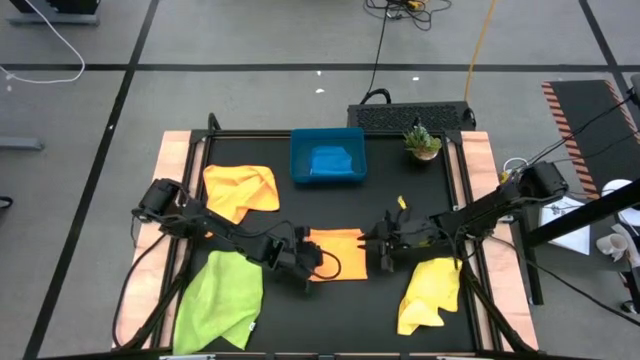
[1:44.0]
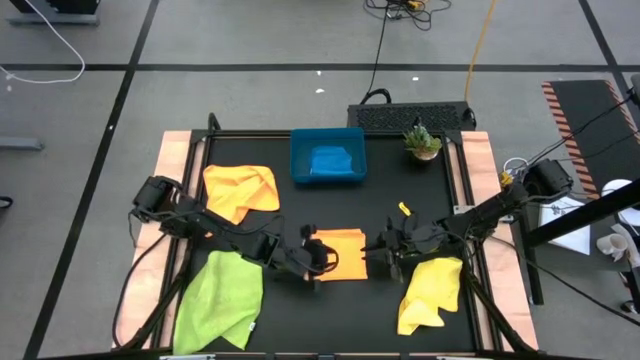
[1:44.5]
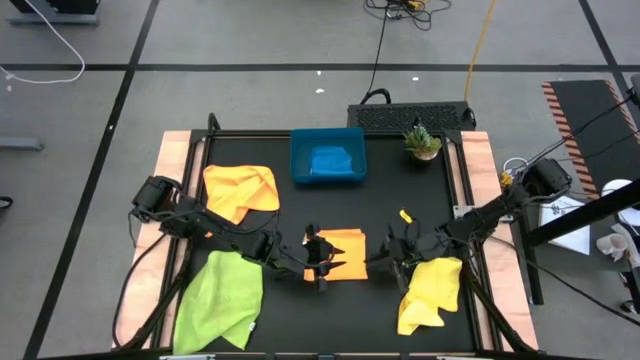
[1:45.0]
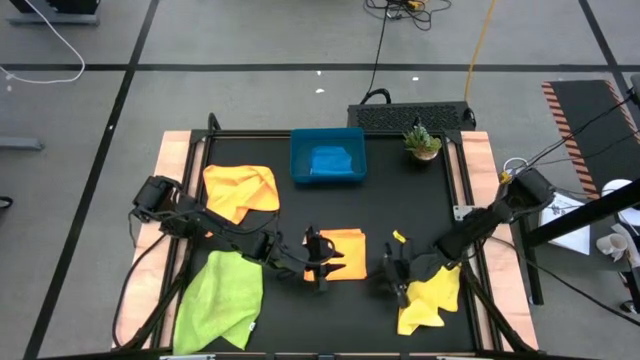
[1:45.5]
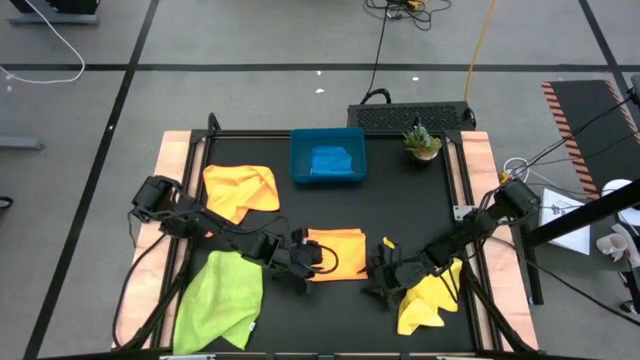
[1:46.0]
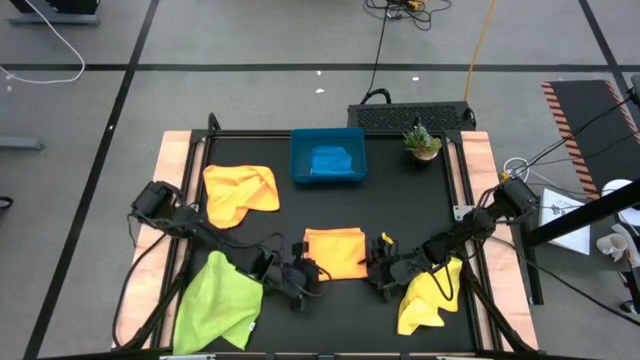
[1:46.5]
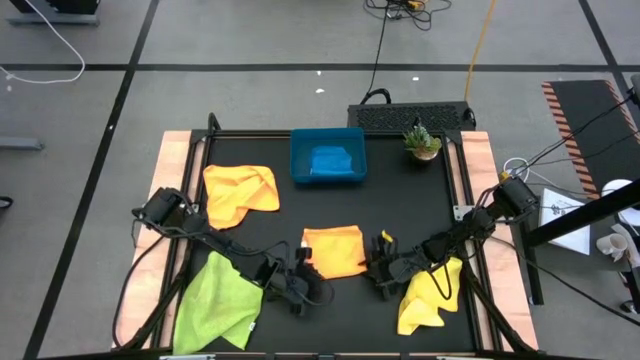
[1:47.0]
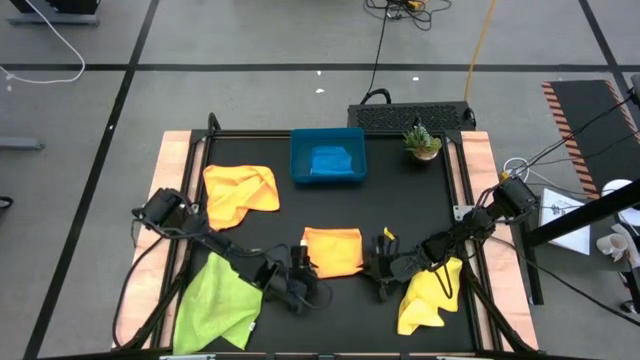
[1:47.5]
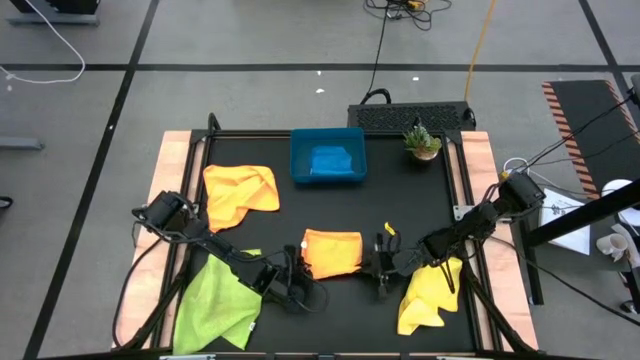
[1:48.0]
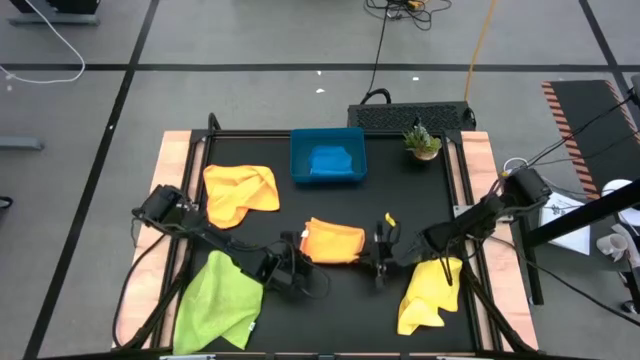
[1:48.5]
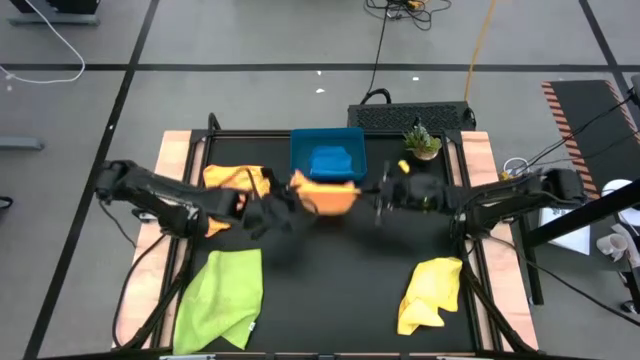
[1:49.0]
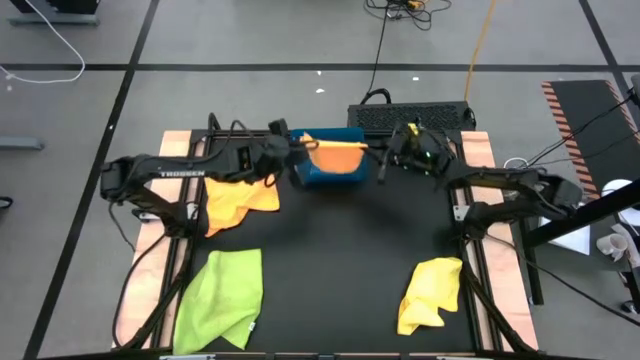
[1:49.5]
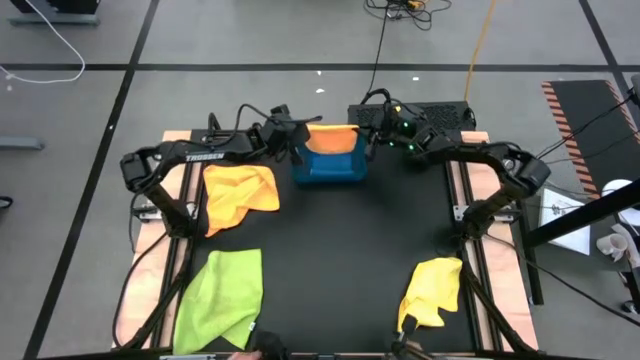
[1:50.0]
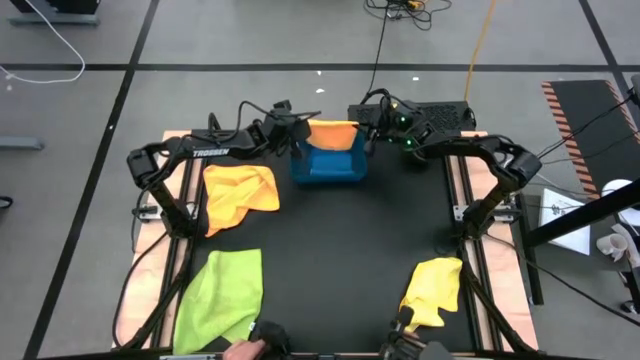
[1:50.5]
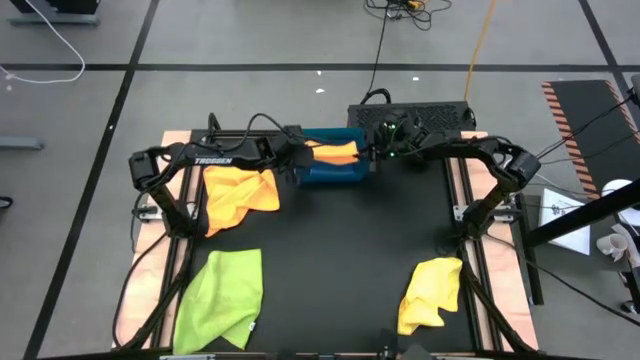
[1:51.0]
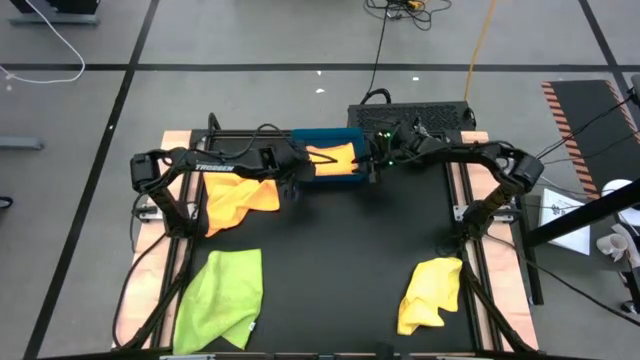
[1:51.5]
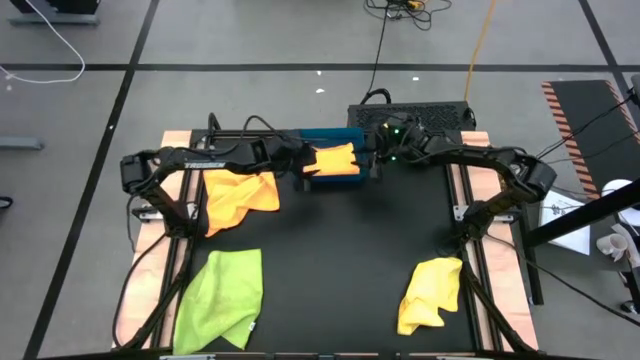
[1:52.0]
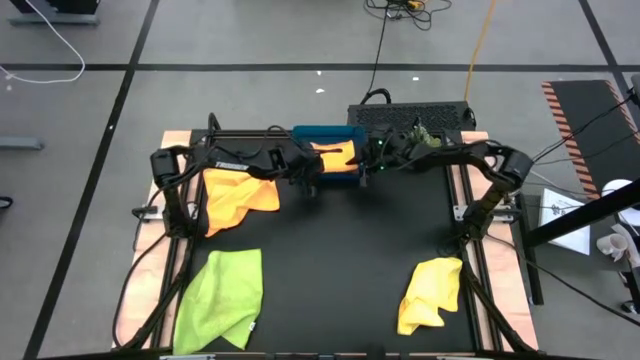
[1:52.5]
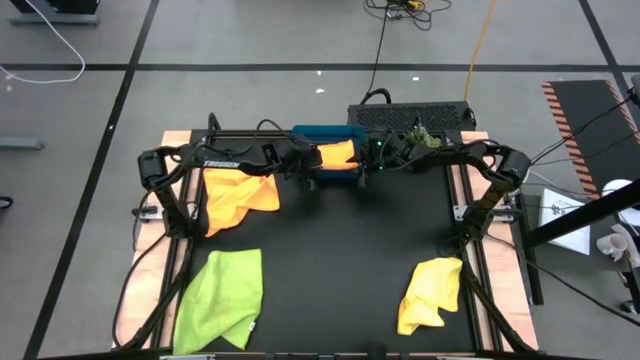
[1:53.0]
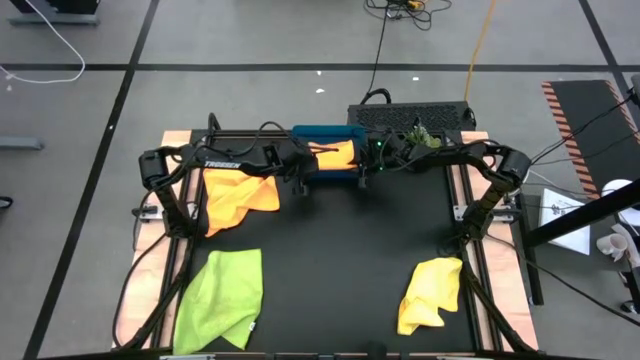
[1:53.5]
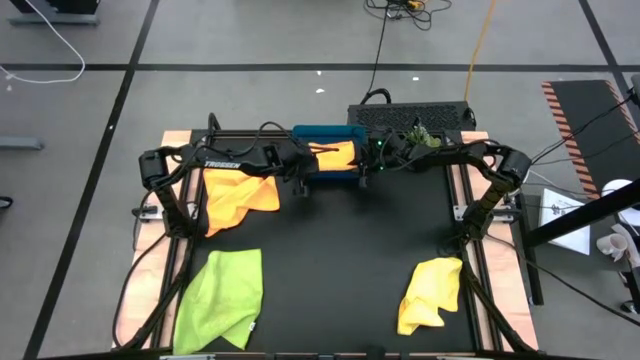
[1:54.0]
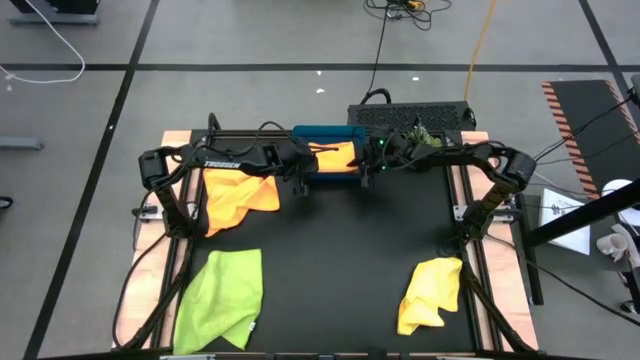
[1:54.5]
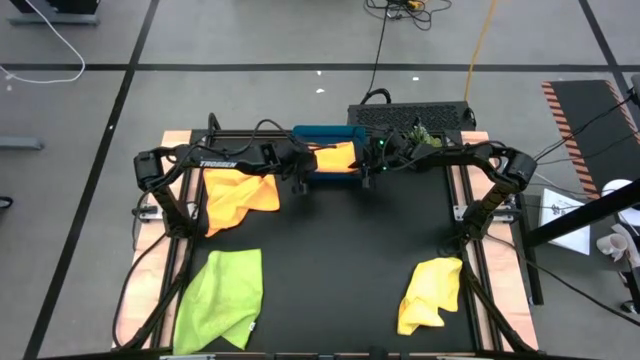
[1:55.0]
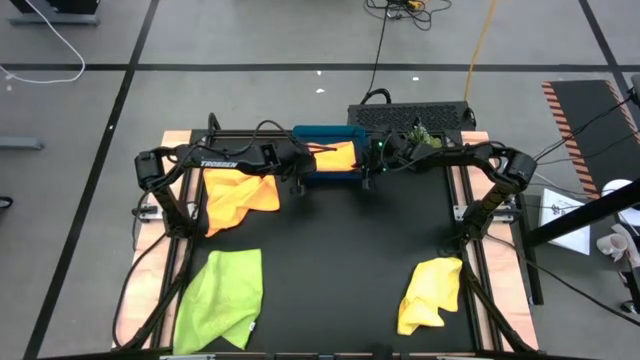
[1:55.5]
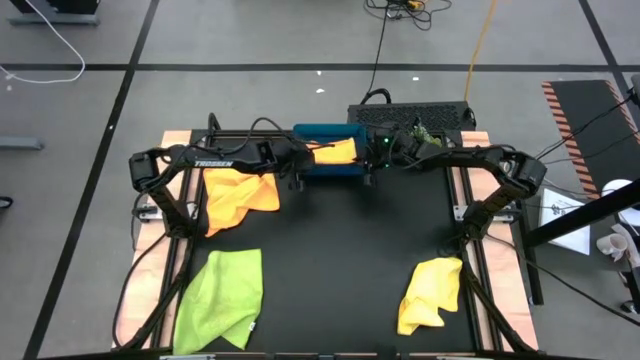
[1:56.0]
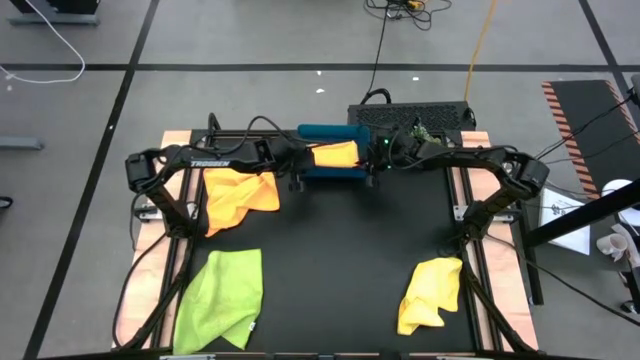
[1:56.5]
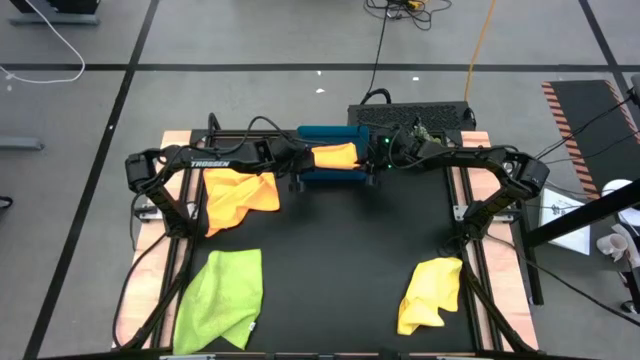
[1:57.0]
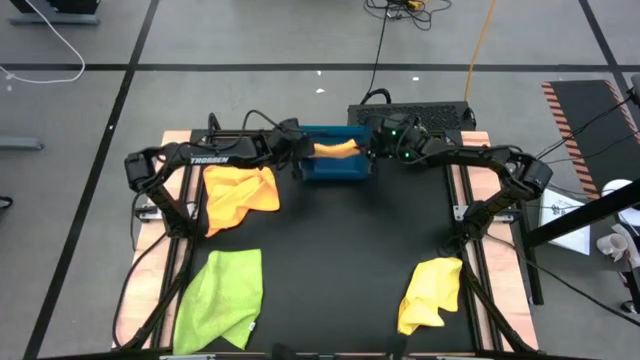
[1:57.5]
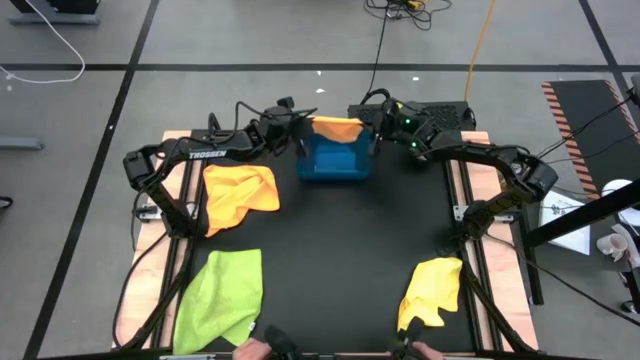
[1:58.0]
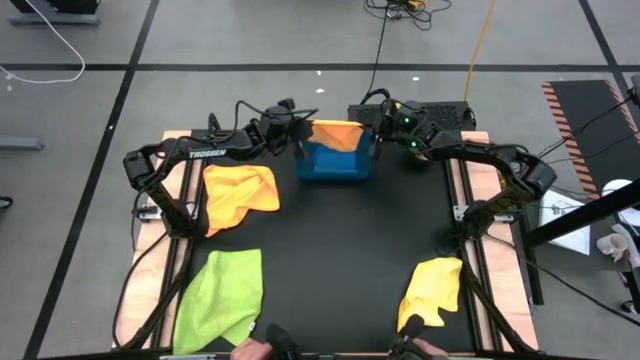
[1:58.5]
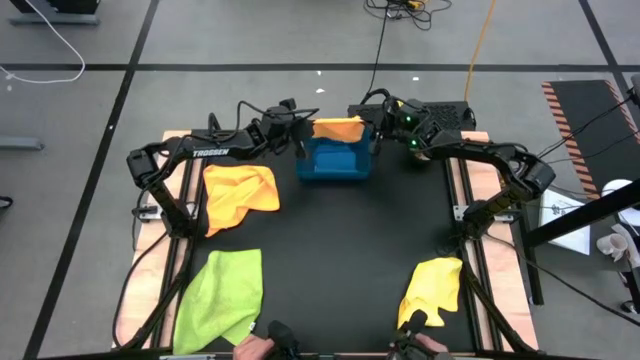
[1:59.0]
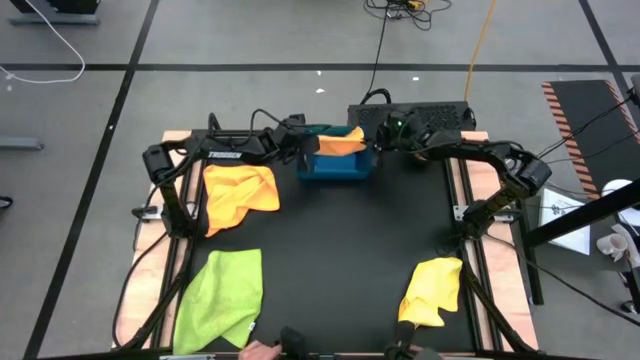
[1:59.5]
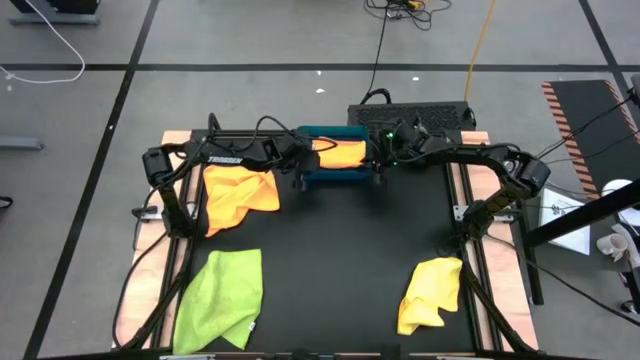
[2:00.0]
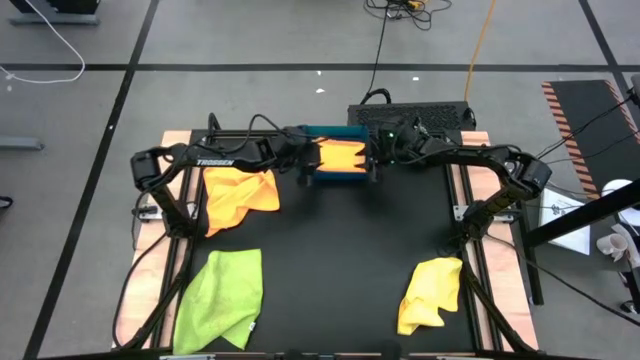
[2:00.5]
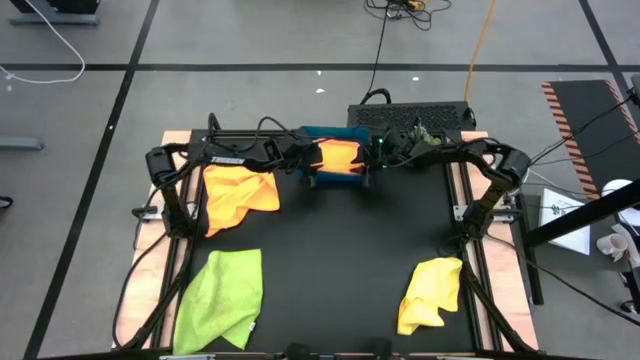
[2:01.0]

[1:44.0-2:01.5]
Task: Fold microfiber towels
Put the orange microfiber cloth into the dark blue bin

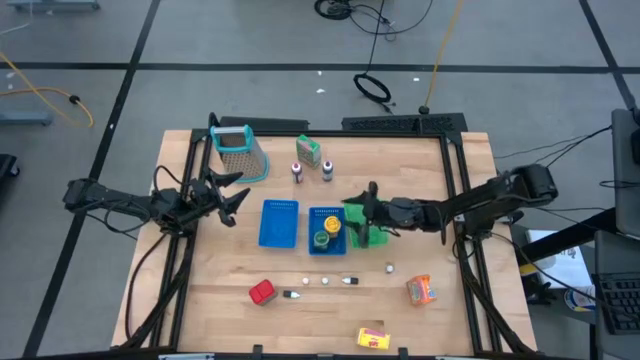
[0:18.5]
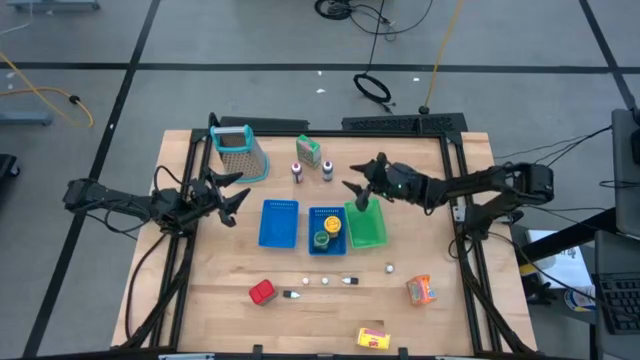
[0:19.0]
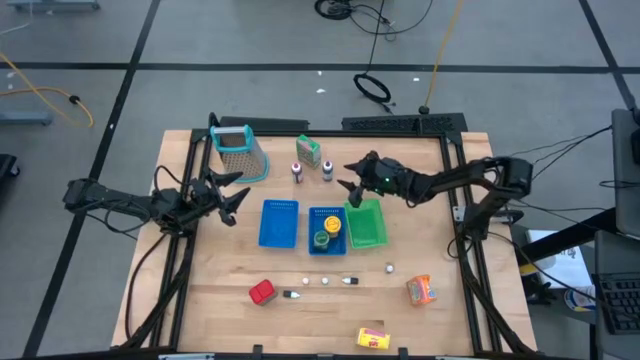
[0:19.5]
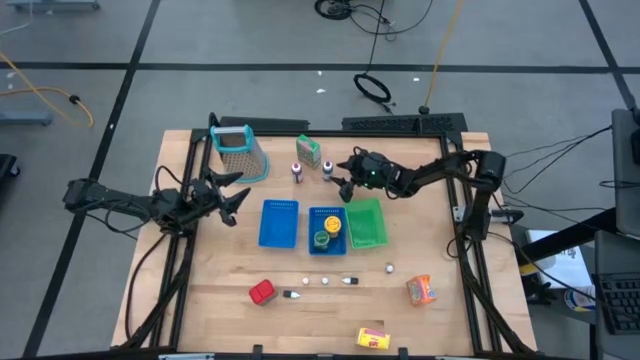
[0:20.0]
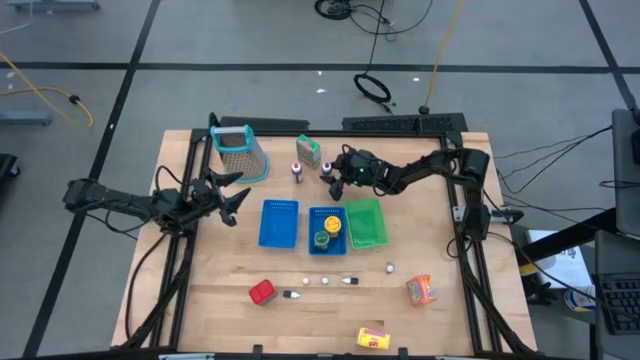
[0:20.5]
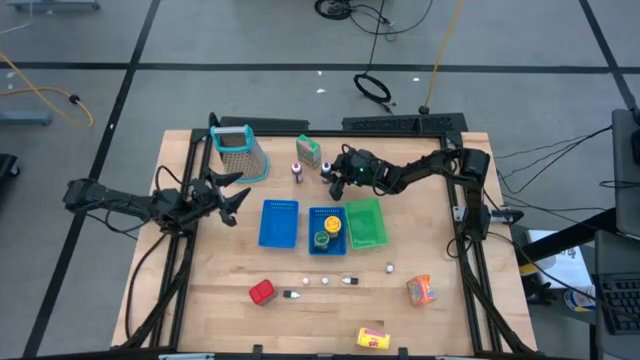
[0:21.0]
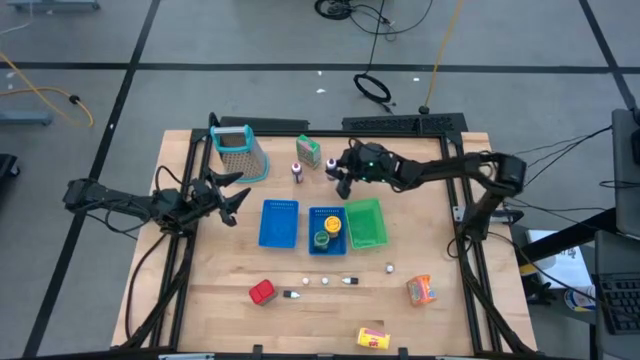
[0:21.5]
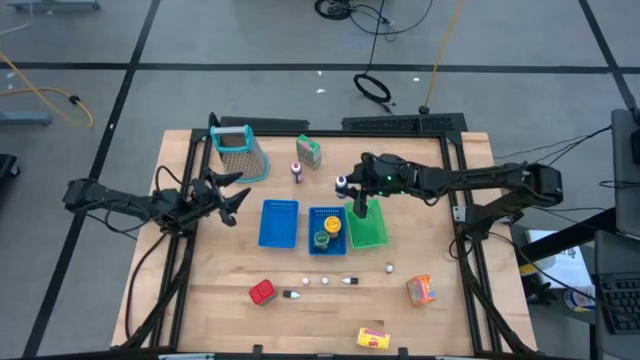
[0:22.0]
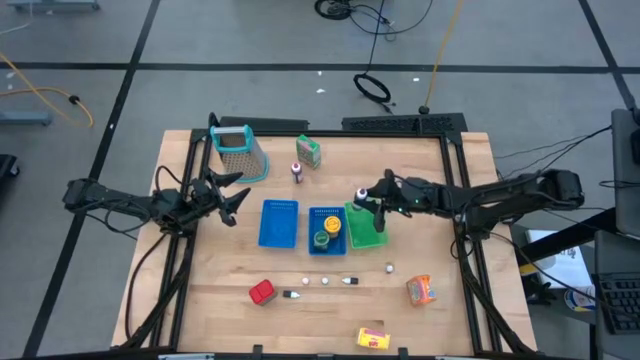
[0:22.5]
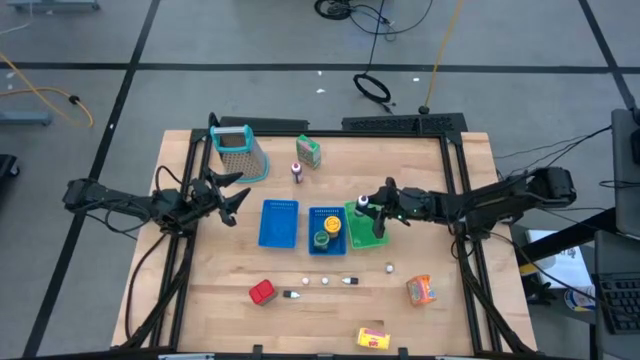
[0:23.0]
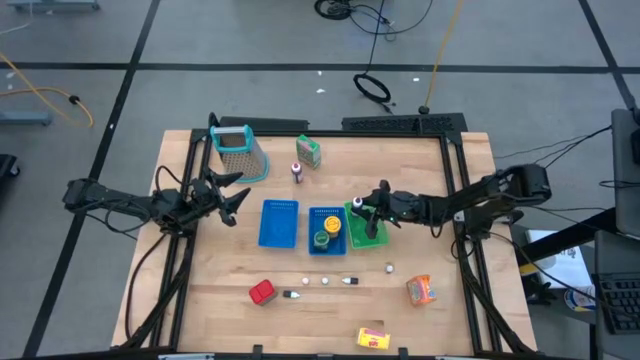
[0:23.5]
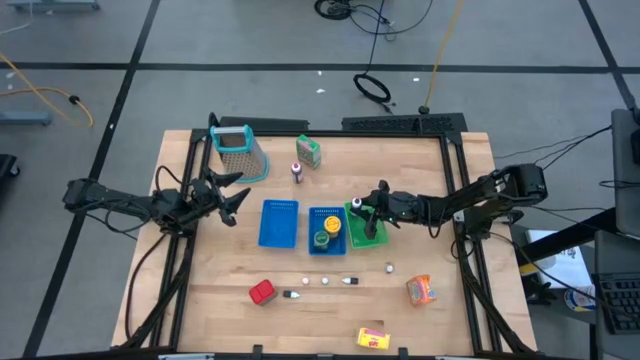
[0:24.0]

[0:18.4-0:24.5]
Task: Pick & Place Kitchen Items
Put the large purple food color into the green bin
